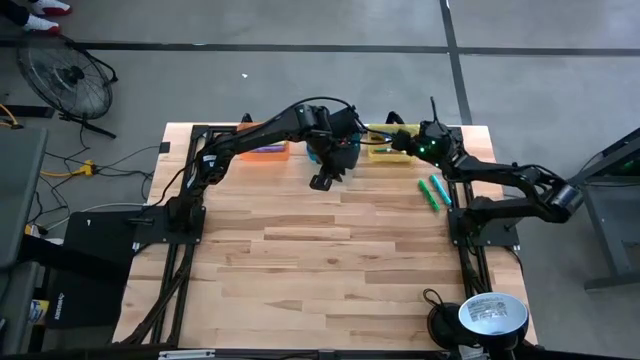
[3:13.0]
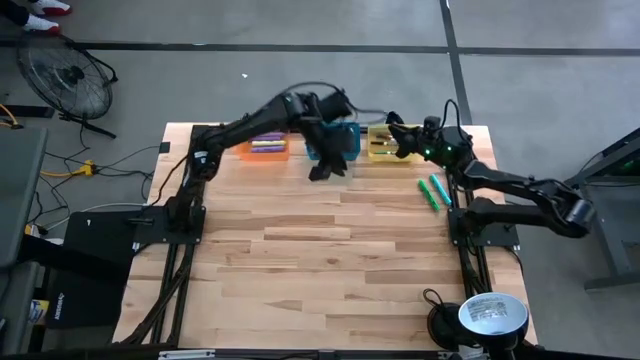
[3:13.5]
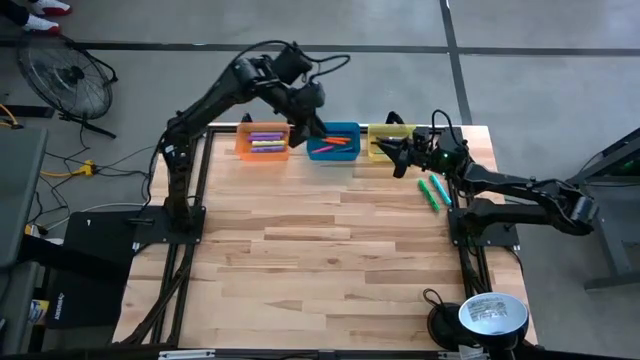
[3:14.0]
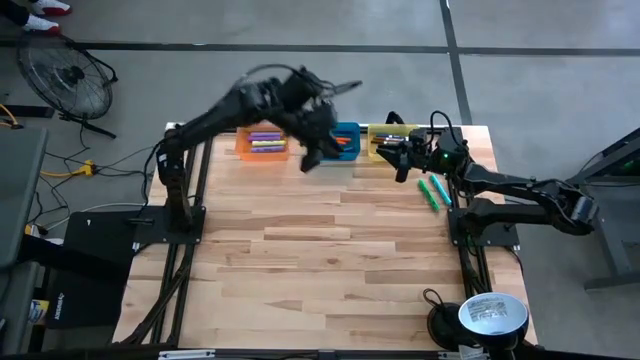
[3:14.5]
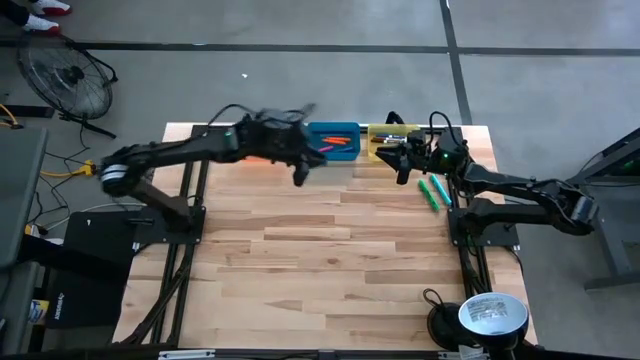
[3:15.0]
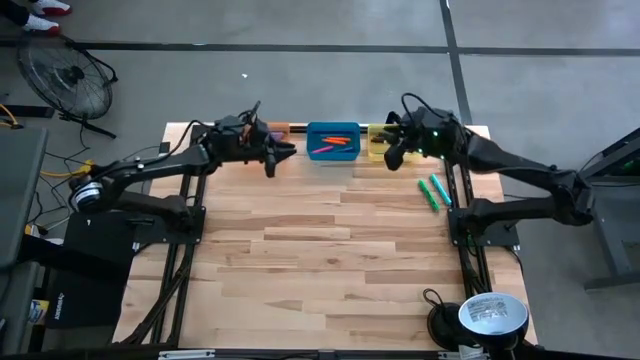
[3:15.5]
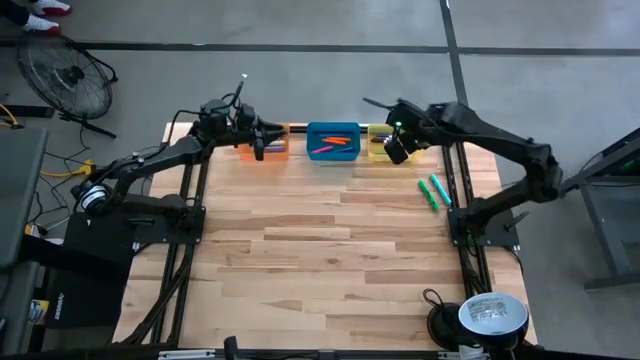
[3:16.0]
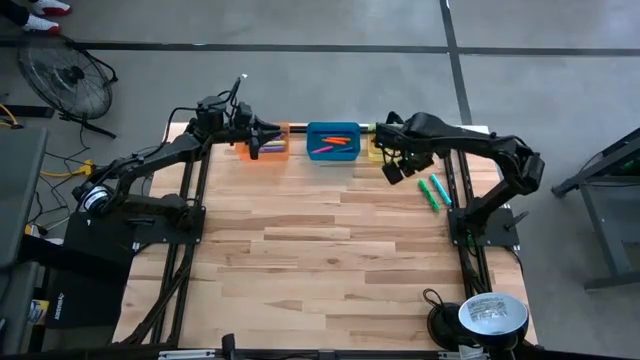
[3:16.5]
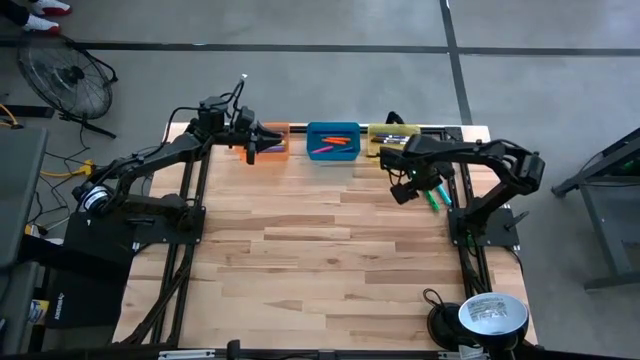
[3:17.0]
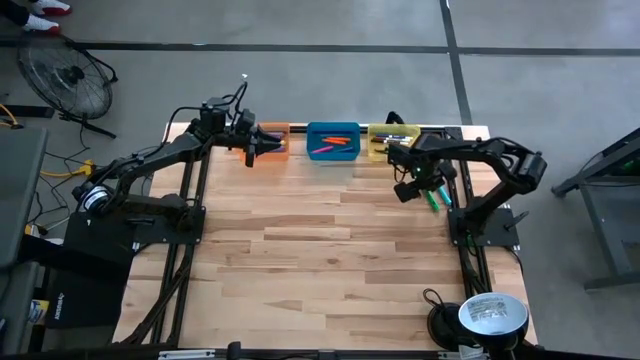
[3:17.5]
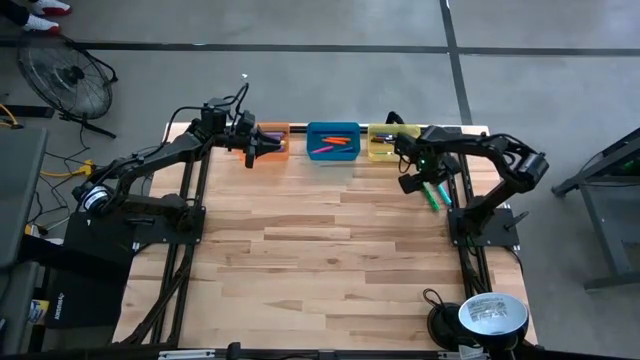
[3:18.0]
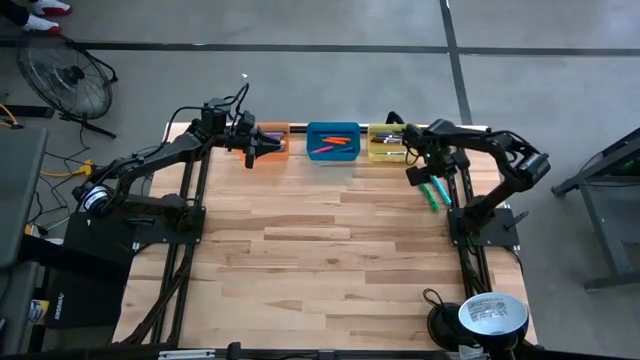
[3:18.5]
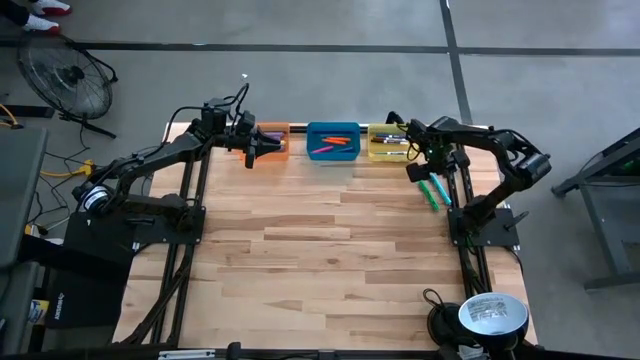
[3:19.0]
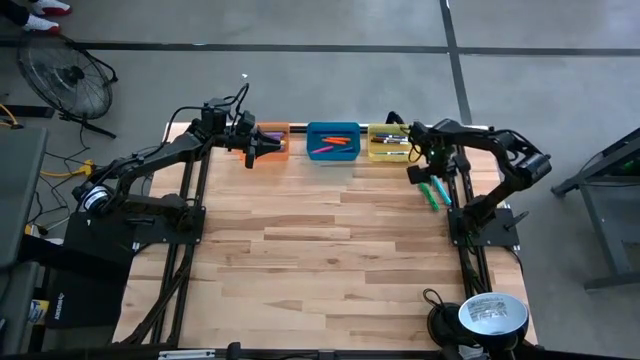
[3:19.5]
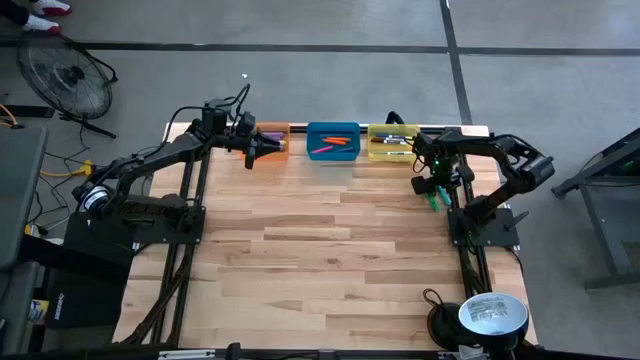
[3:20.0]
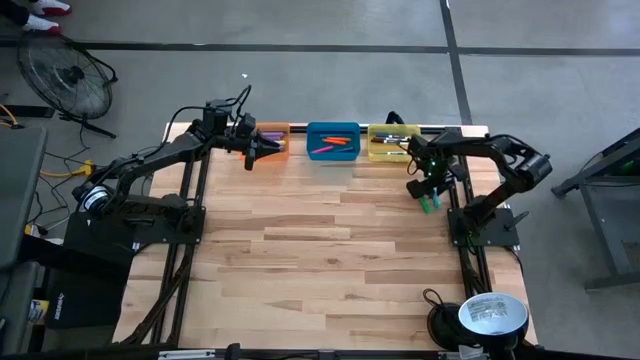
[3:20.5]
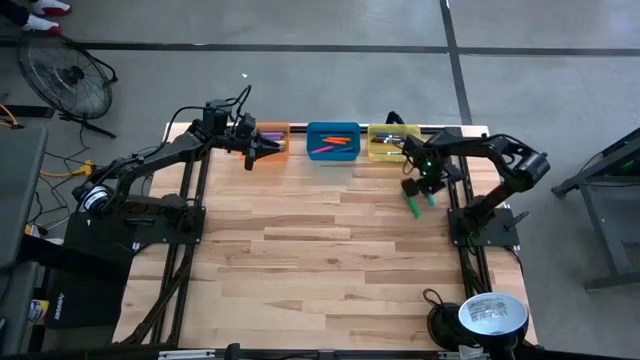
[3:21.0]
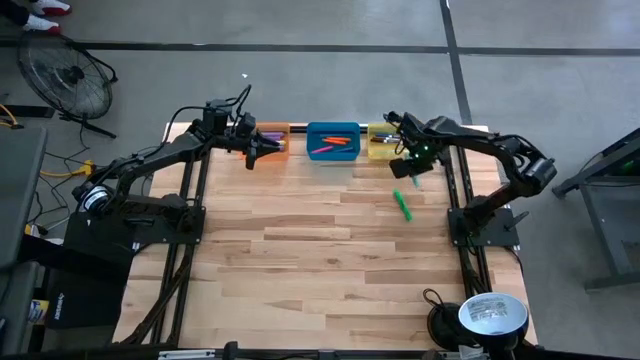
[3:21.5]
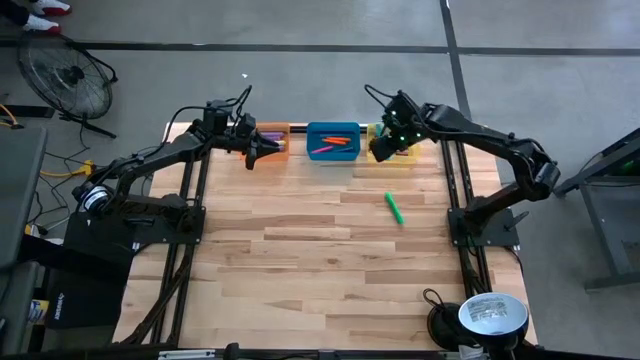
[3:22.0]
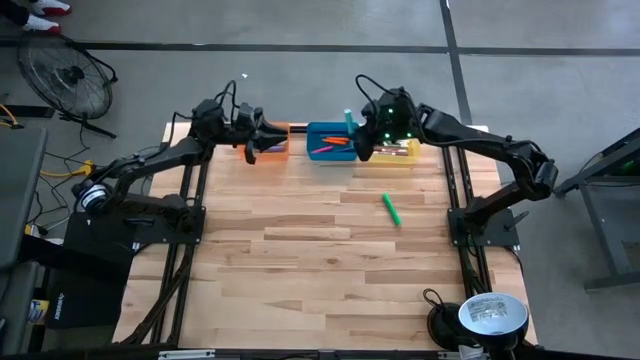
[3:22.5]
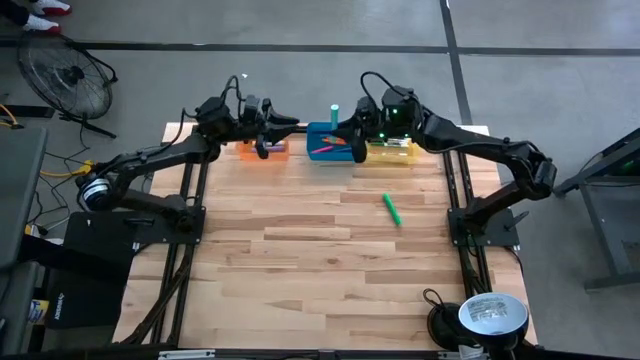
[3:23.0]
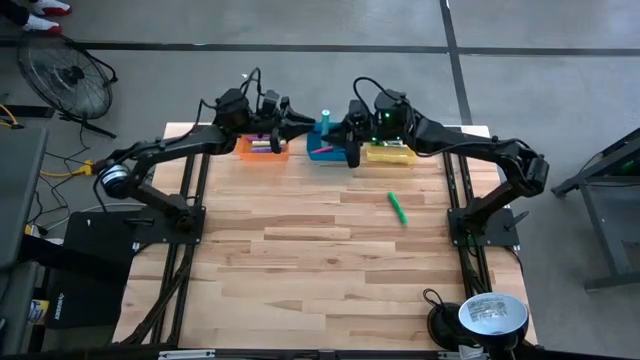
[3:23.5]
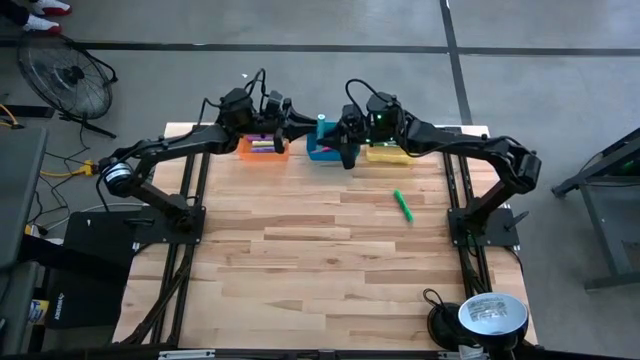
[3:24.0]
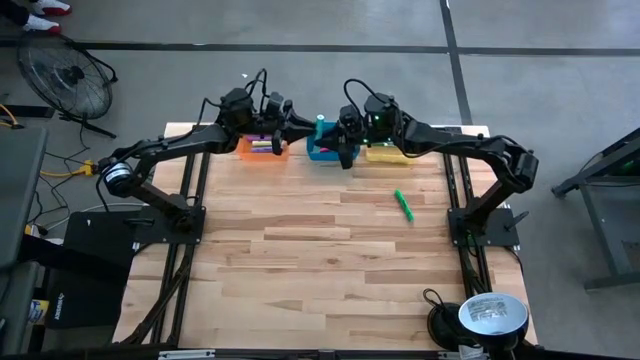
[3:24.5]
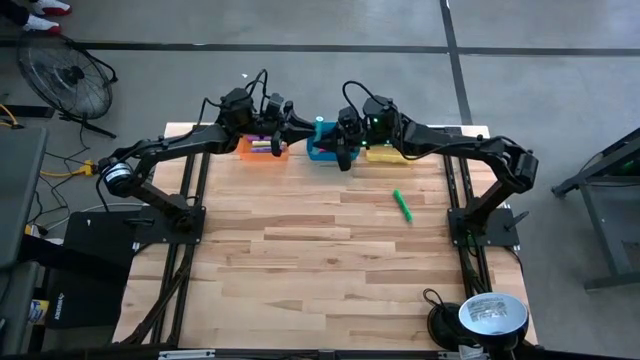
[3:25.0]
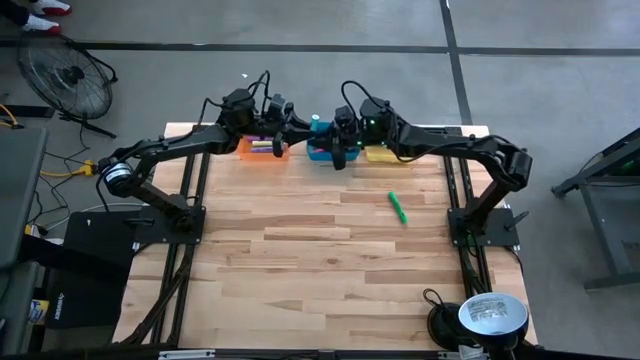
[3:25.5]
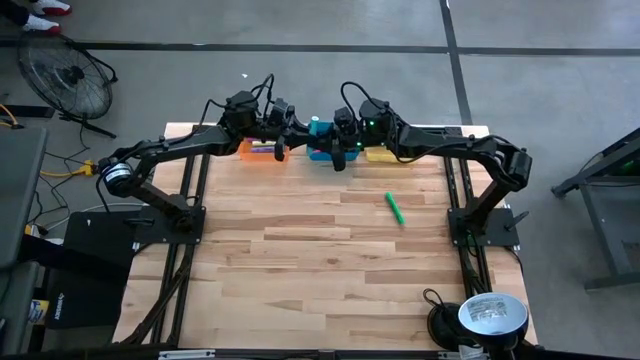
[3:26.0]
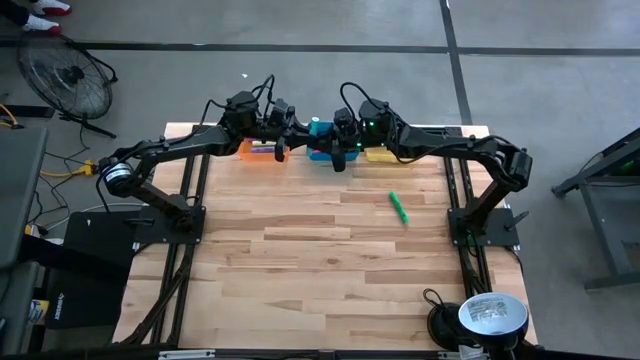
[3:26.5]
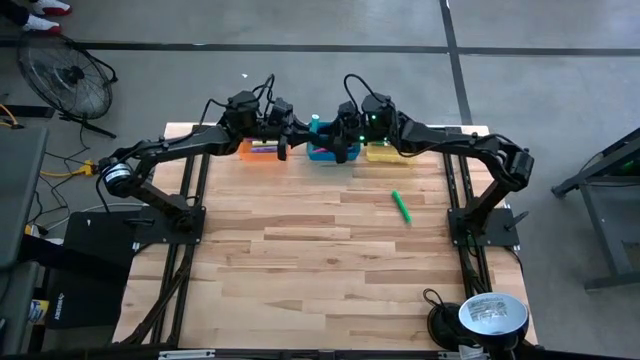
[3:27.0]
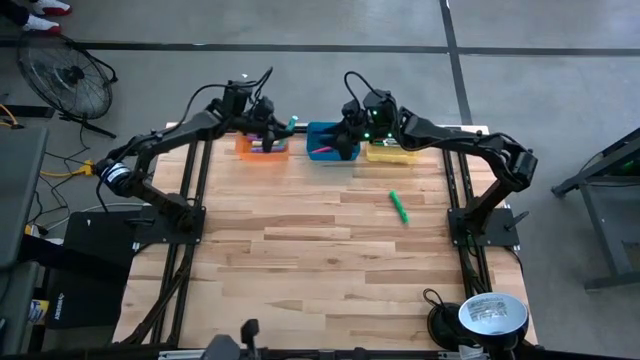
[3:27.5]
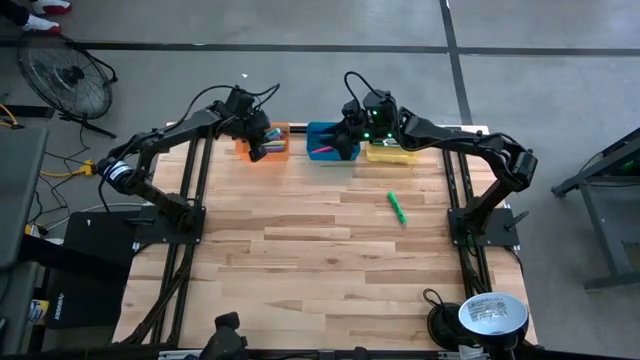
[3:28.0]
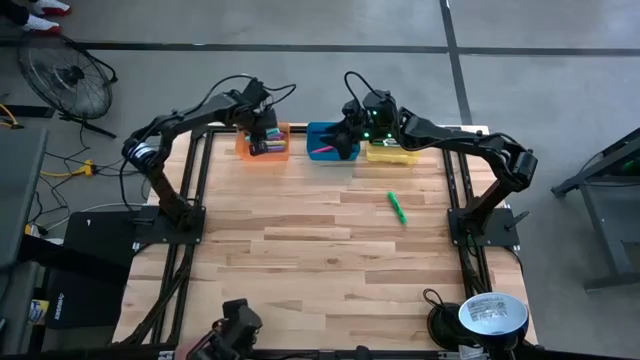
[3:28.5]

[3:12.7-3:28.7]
Task: Pick & Place Markers
Put the blue highlighter into the orange bin

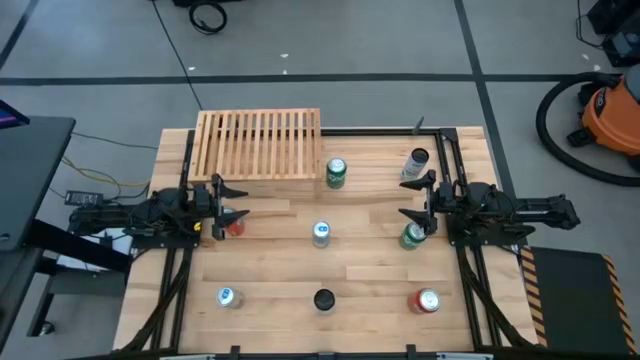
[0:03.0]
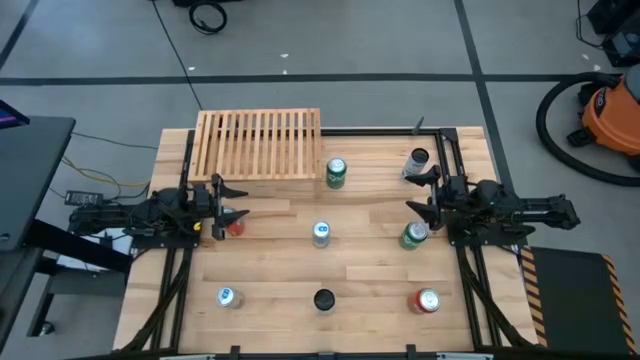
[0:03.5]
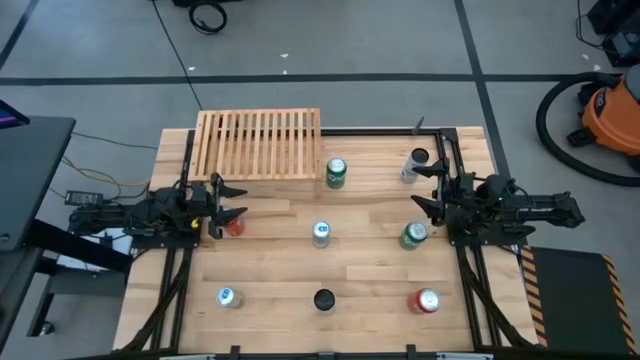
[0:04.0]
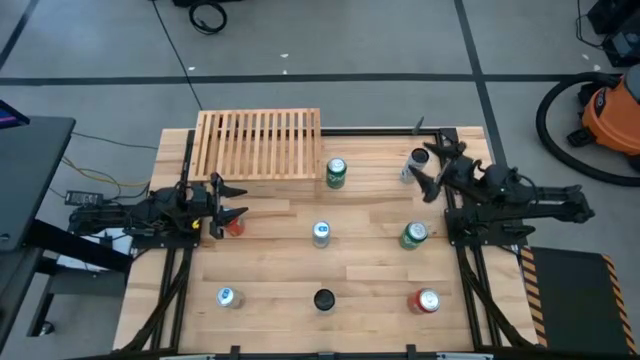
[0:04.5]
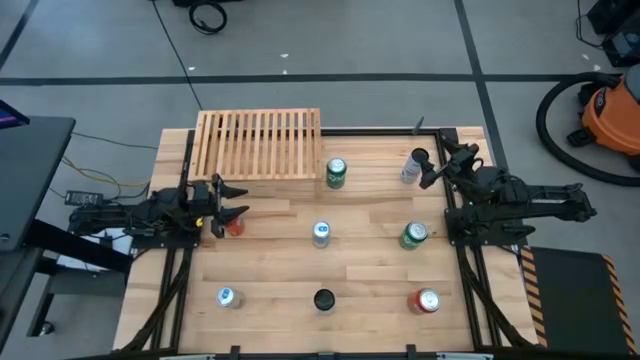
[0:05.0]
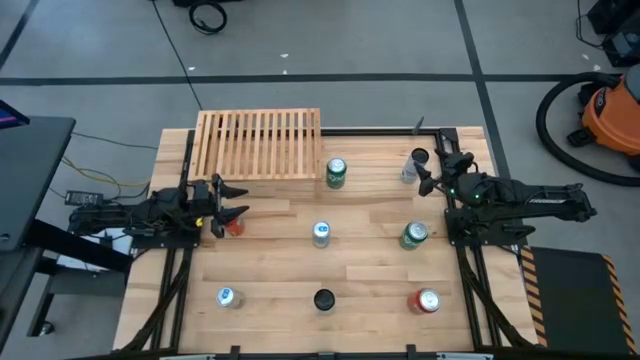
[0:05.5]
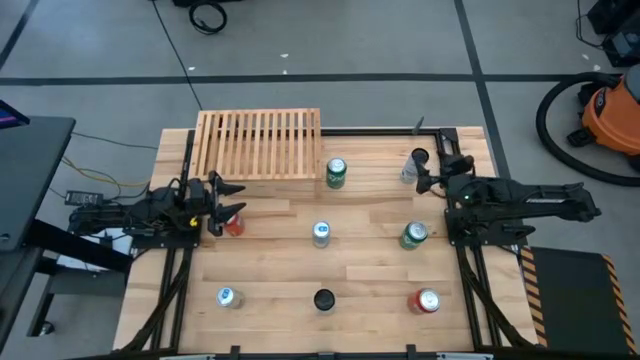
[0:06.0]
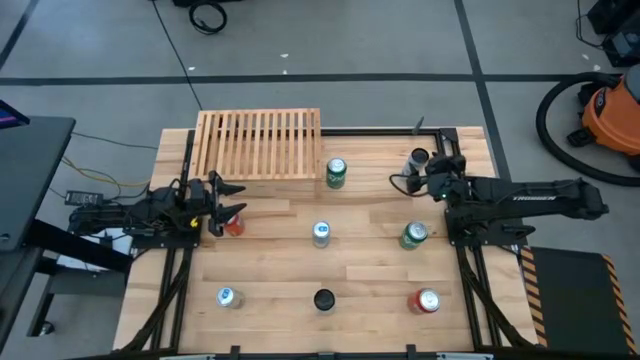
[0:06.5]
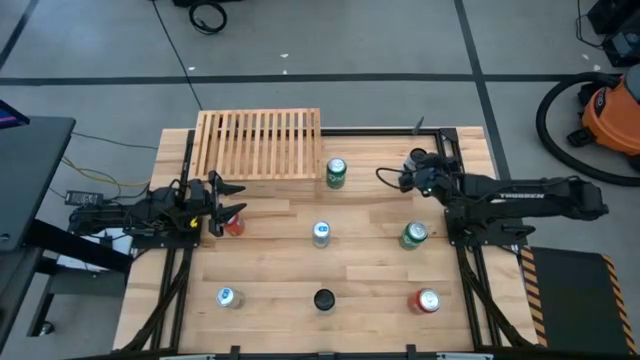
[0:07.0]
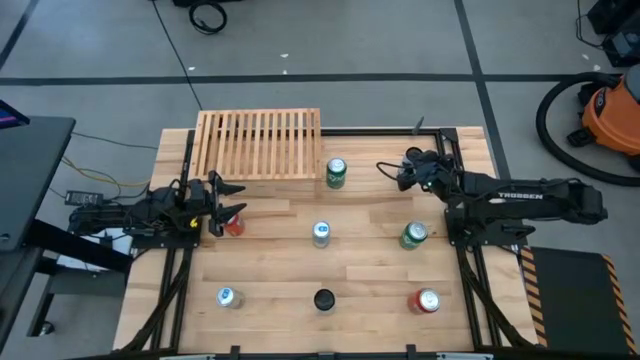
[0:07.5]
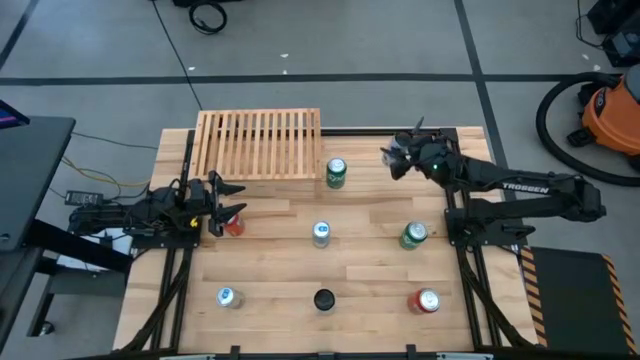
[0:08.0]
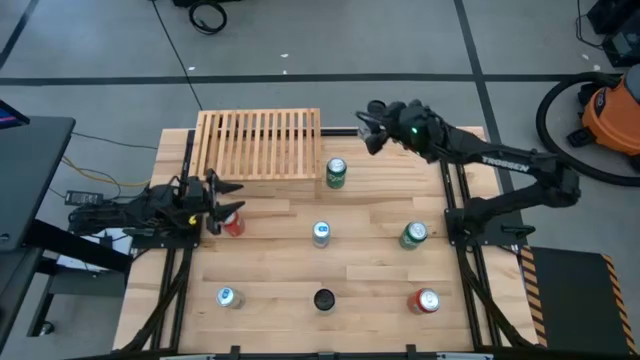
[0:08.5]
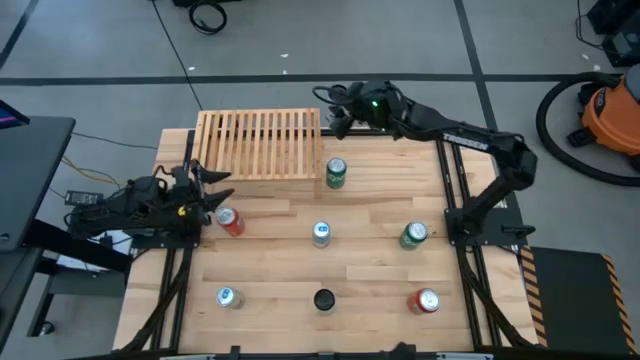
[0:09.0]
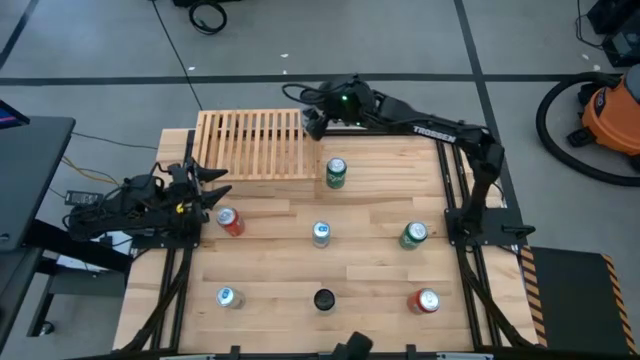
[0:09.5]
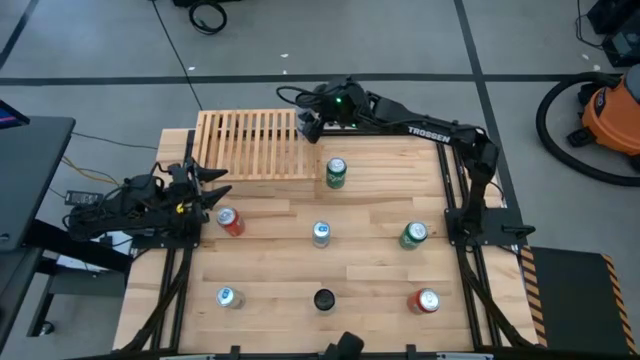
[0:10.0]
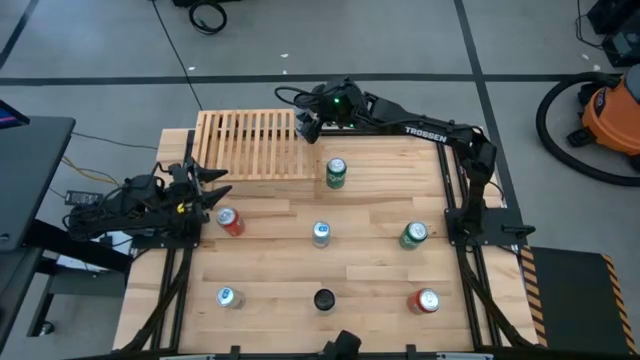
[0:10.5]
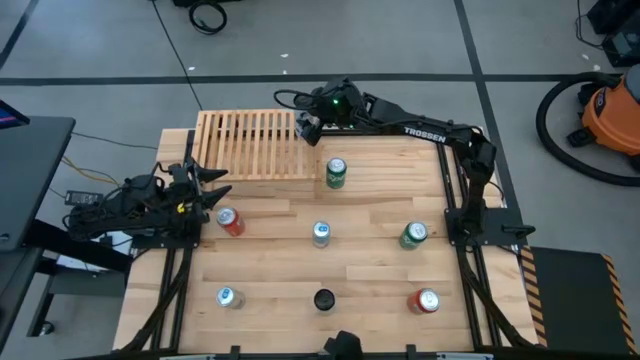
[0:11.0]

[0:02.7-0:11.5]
Task: Place canned beverage on shelf
Put the top White-blue soda can on the shelf
